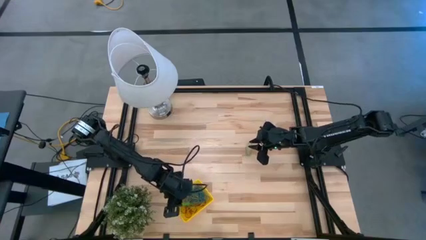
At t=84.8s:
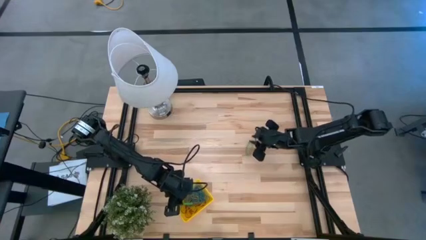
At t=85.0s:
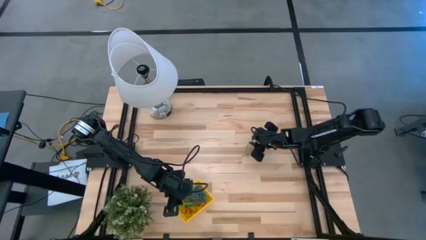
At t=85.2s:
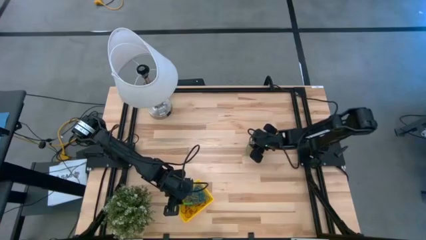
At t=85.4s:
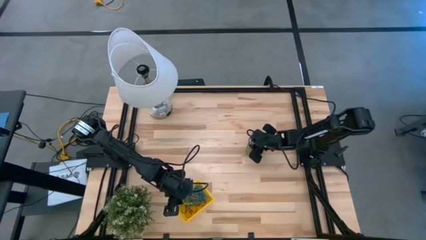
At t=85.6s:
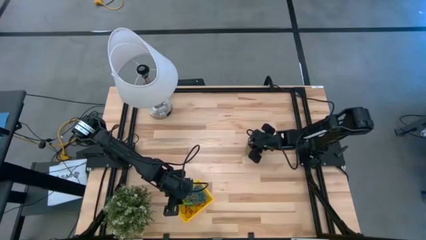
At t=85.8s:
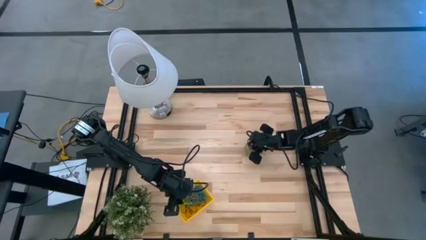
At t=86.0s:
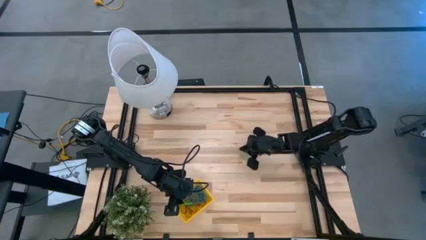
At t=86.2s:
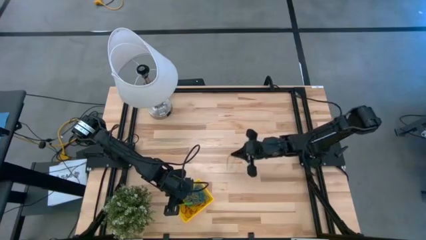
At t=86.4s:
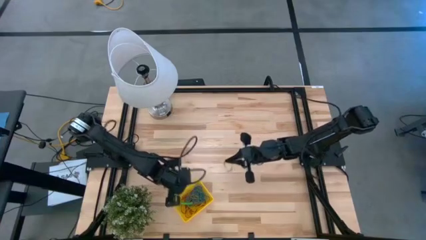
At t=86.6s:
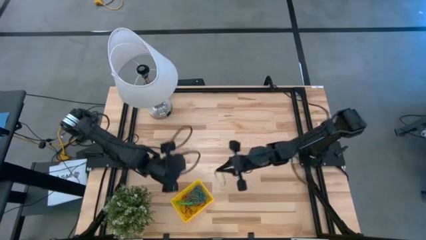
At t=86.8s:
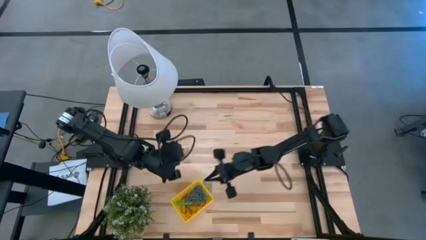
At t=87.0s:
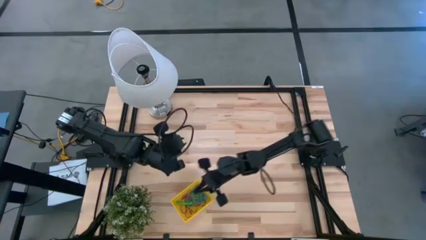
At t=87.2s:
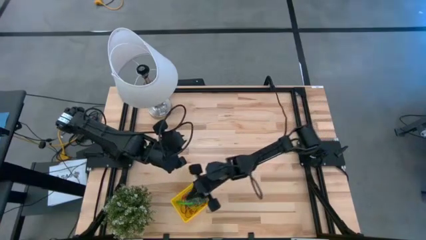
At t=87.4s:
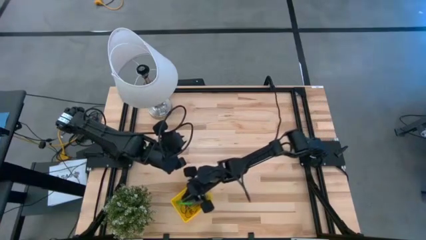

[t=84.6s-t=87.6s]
Task: Pick and place items into bin
Put the green rubber band into the yellow bin

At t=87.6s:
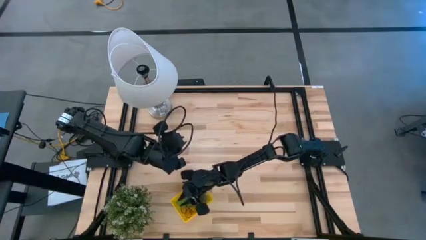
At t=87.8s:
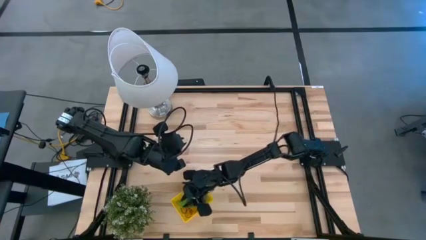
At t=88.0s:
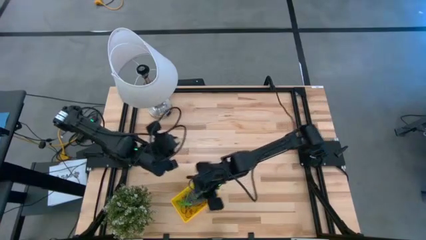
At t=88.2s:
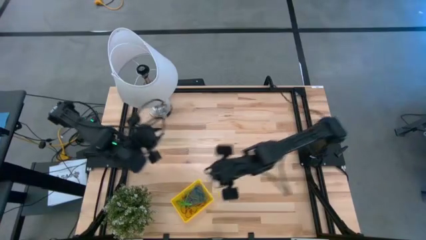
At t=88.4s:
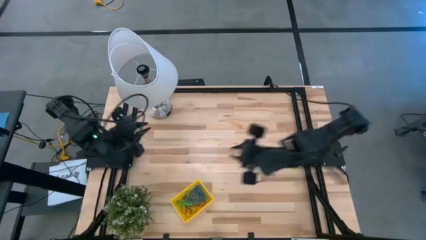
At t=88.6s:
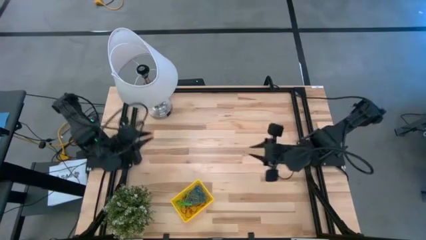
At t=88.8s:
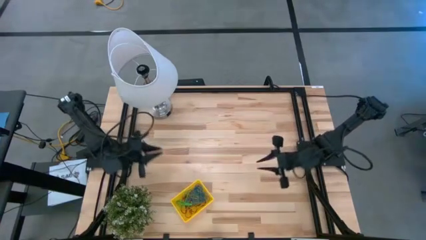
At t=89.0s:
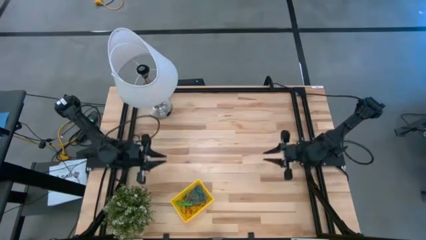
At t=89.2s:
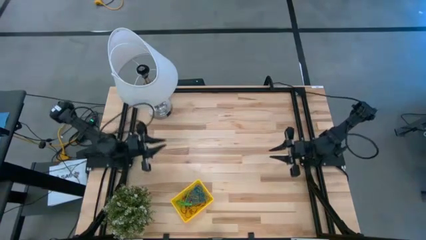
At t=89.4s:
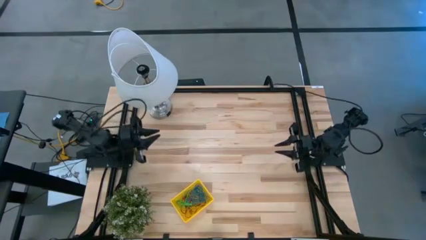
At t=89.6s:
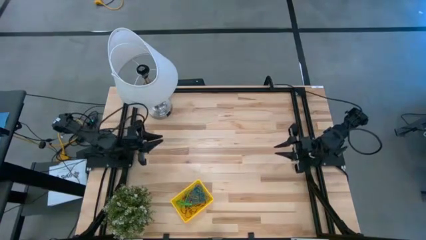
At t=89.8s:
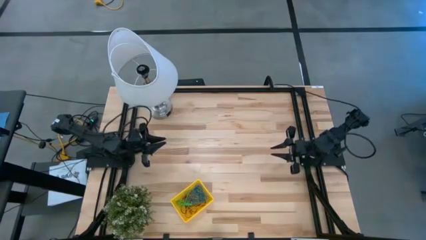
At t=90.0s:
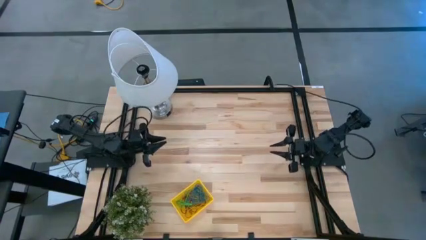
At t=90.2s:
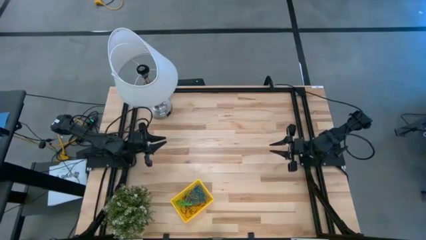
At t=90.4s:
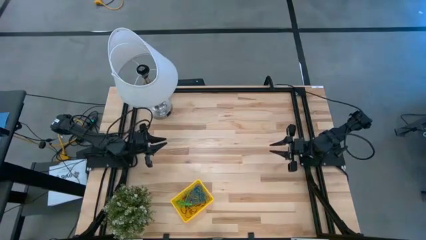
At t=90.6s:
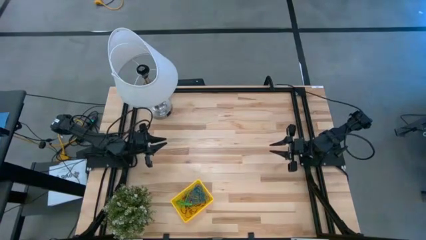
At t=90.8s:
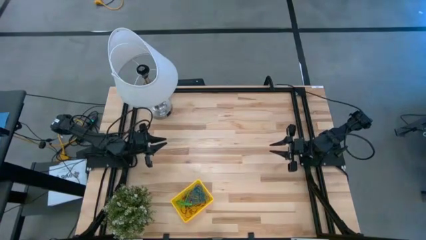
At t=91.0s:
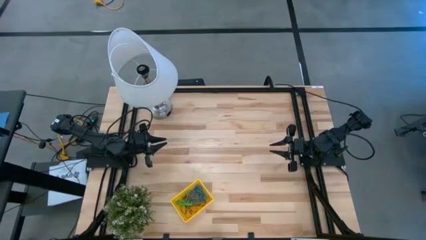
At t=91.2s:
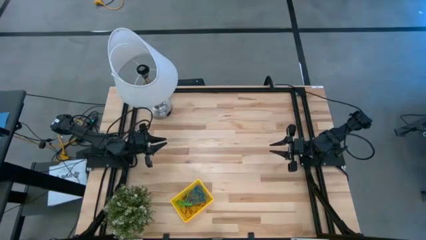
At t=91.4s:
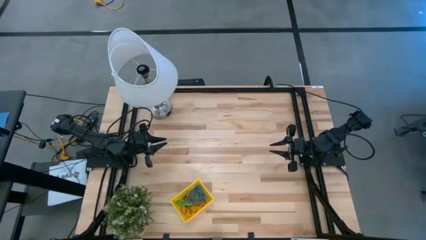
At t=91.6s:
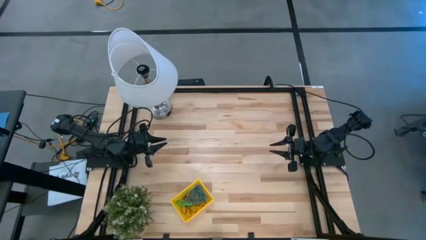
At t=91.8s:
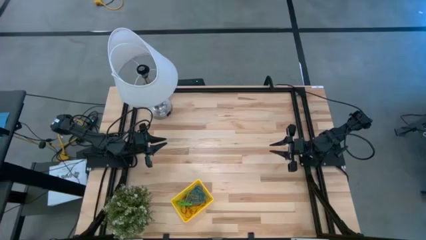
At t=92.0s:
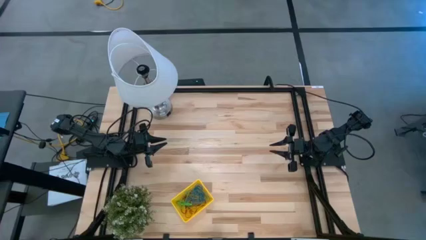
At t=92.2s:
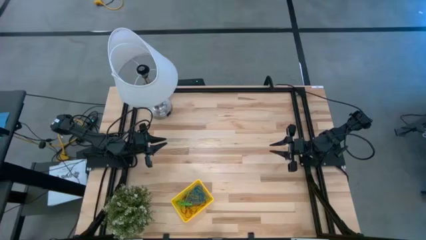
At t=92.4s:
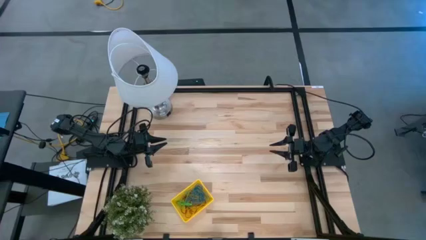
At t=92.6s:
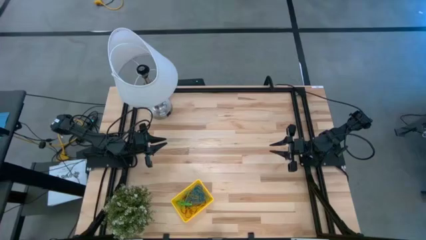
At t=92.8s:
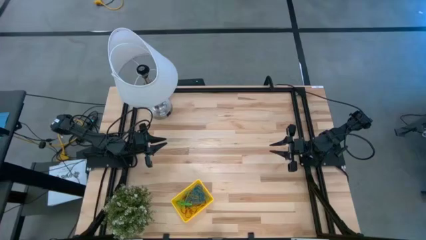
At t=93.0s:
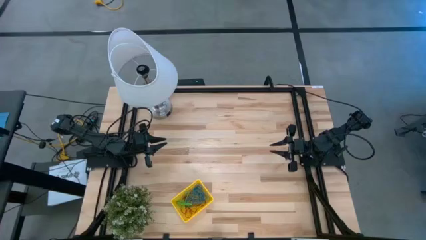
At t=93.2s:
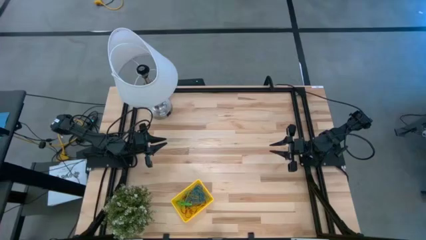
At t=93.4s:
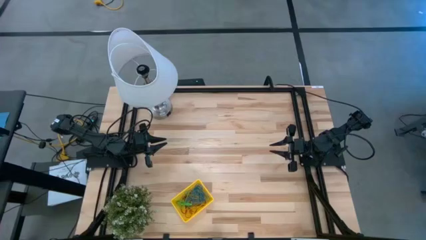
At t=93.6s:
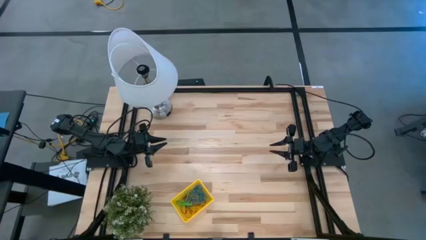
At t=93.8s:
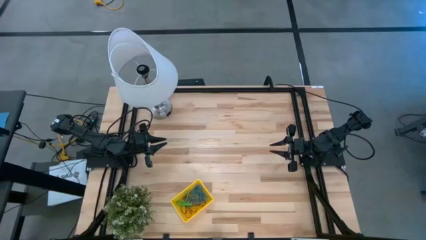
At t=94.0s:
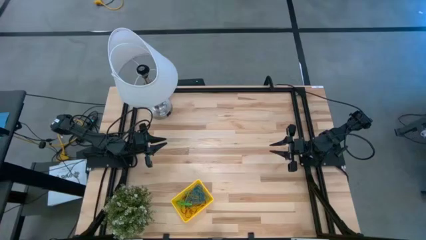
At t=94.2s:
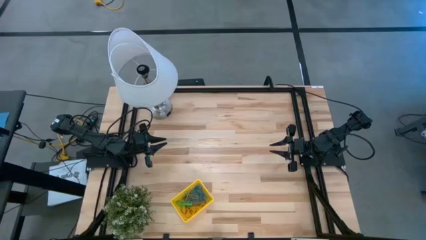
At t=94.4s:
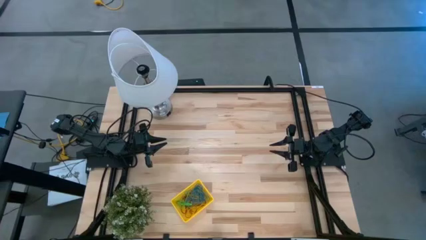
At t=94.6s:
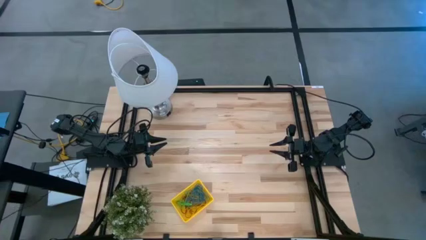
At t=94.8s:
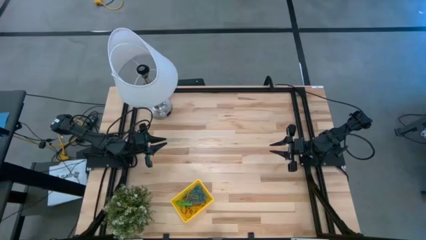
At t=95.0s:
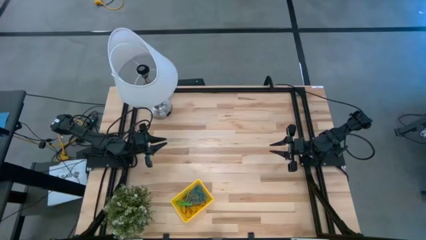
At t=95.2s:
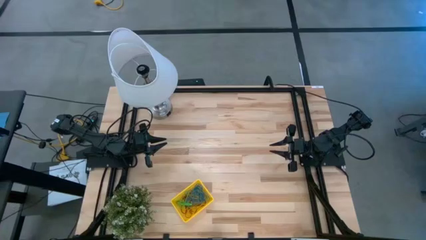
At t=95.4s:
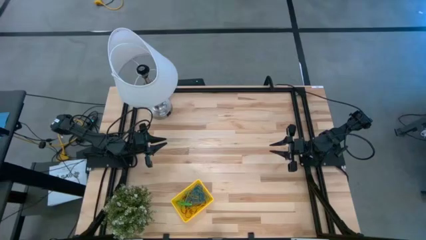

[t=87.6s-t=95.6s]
Return to Home Position

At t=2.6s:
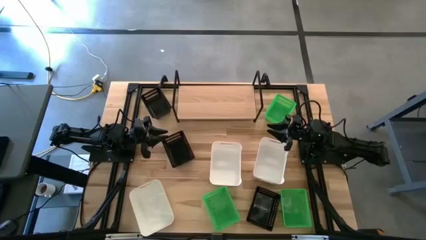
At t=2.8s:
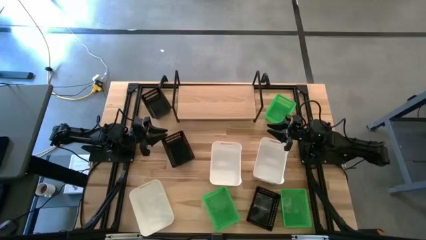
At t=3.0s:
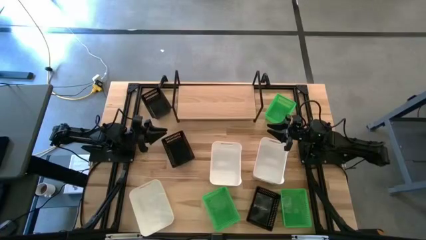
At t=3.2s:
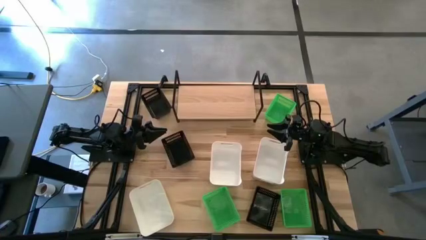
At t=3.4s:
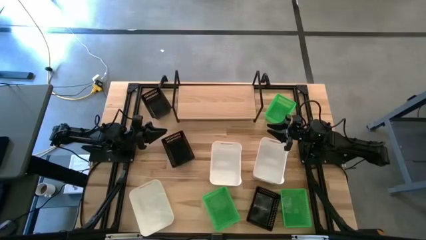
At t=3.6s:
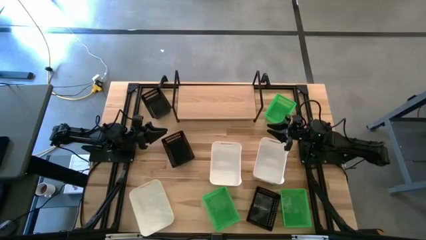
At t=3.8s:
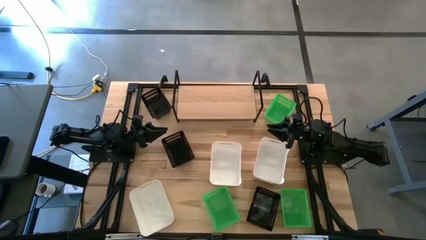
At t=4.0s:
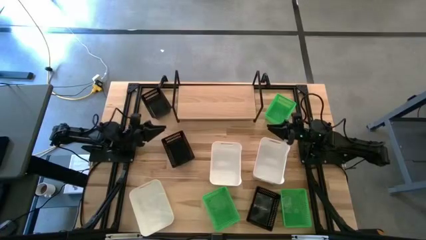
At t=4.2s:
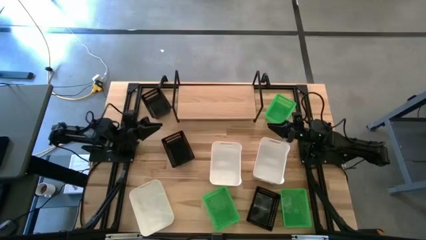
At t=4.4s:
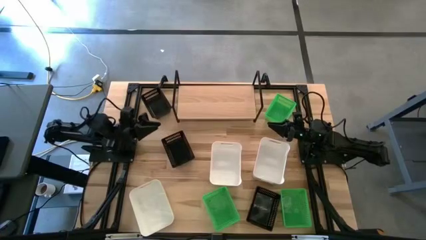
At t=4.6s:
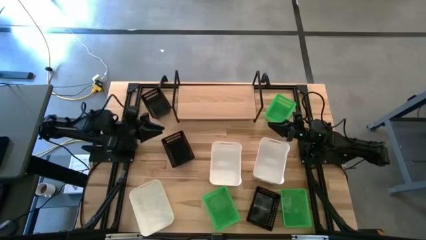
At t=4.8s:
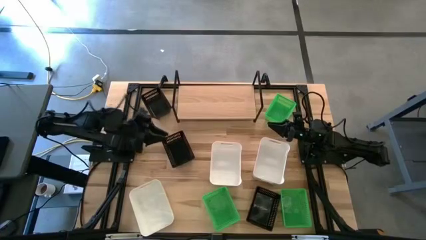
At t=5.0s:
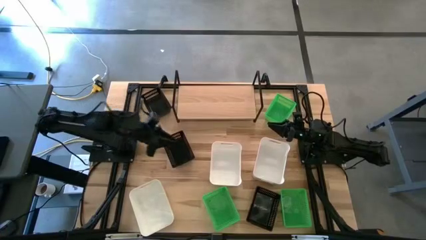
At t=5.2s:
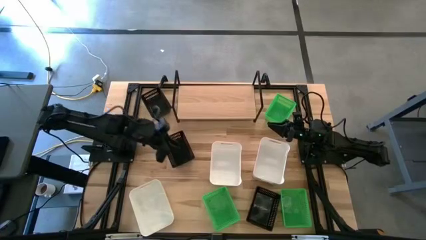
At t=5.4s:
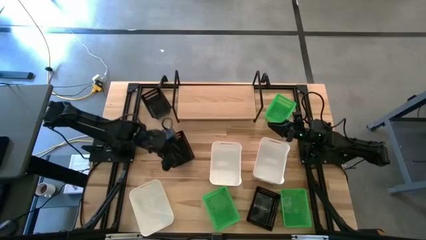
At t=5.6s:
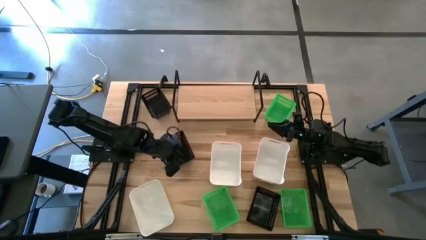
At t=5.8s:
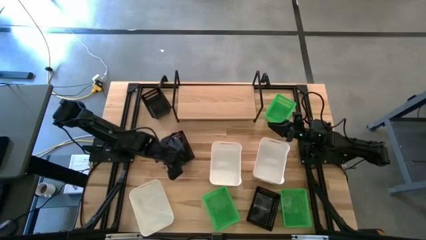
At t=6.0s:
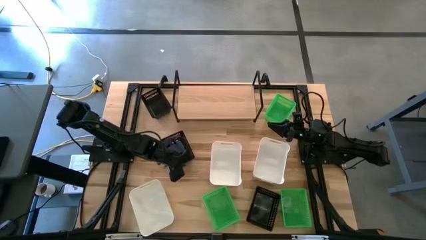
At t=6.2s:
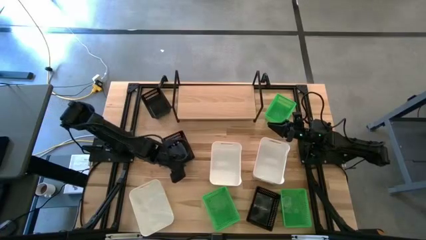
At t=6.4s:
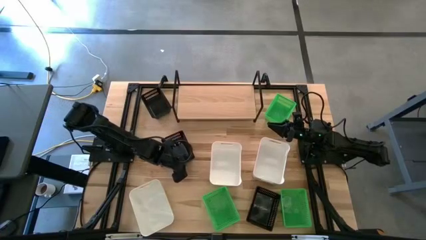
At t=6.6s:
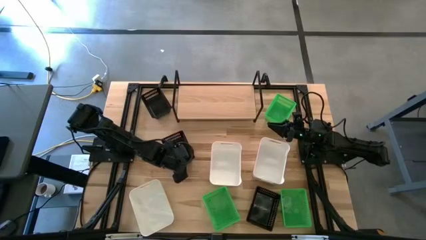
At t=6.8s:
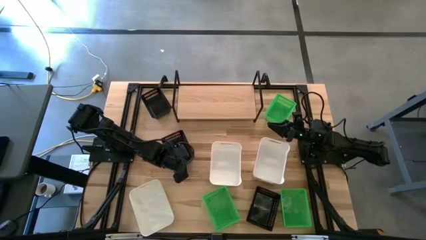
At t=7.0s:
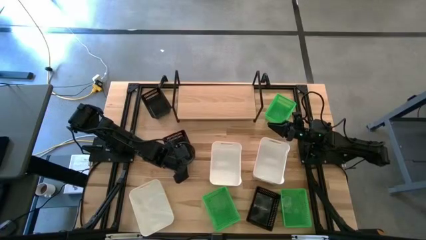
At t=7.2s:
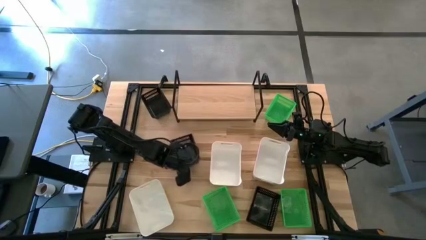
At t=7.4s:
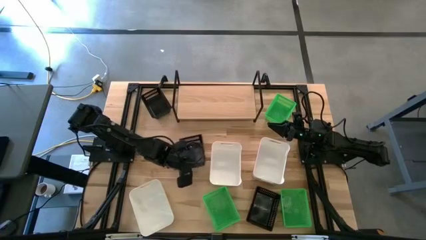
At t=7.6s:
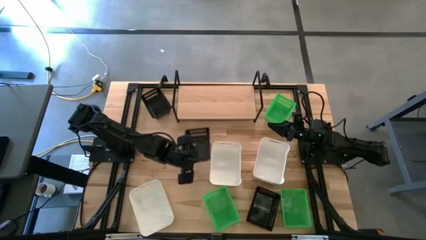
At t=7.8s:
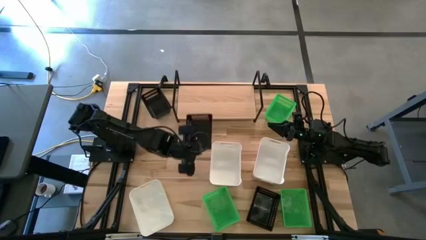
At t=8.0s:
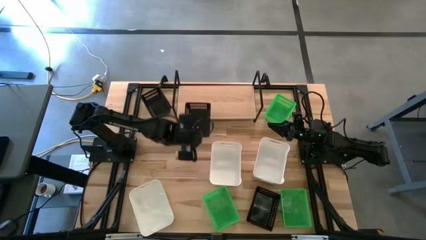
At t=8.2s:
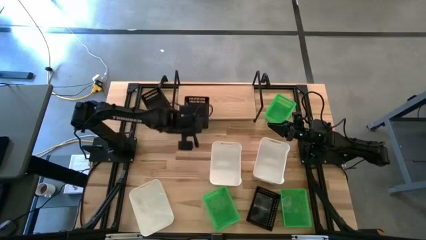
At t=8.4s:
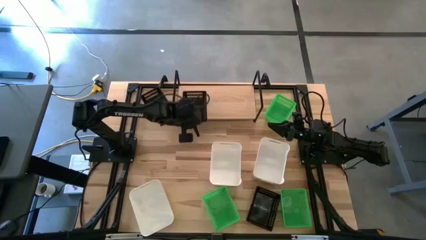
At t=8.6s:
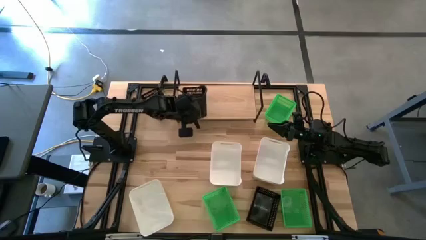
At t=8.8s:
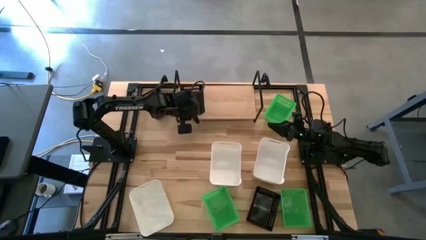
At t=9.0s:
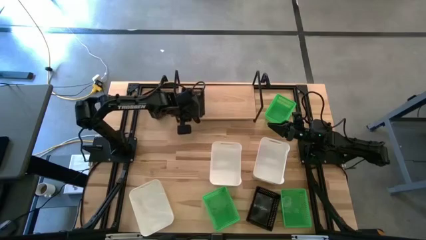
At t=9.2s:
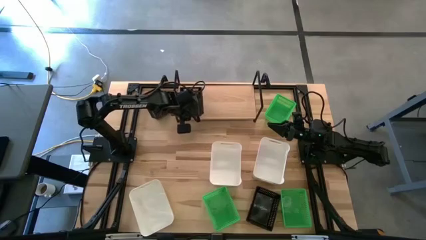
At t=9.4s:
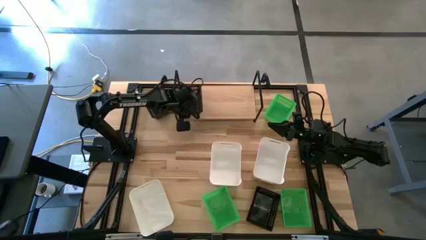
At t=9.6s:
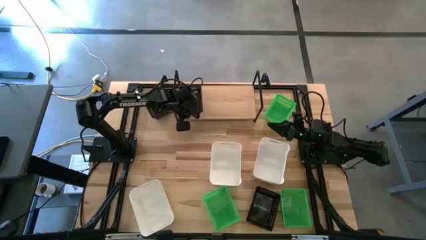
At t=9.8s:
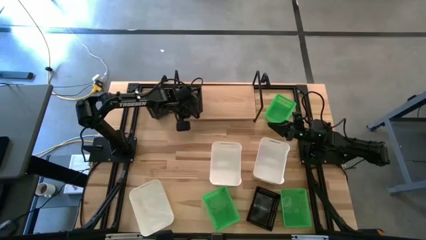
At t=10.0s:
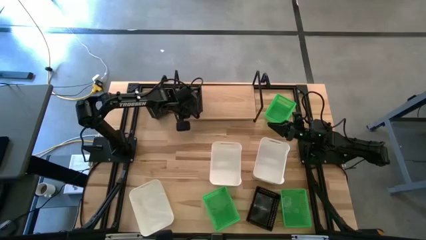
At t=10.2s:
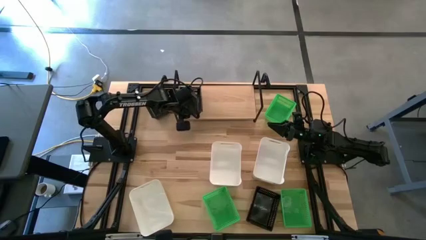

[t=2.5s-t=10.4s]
Task: Stack baskets on shelf by color
Put the middle black bin on the shelf
